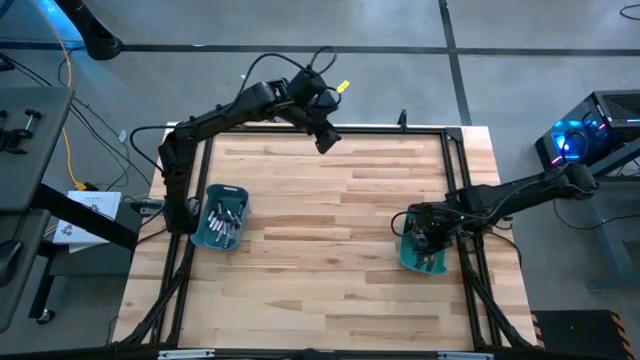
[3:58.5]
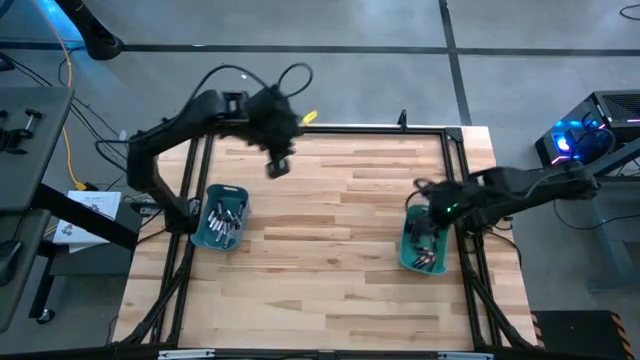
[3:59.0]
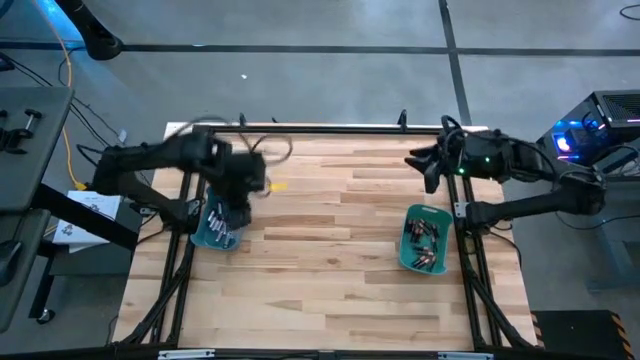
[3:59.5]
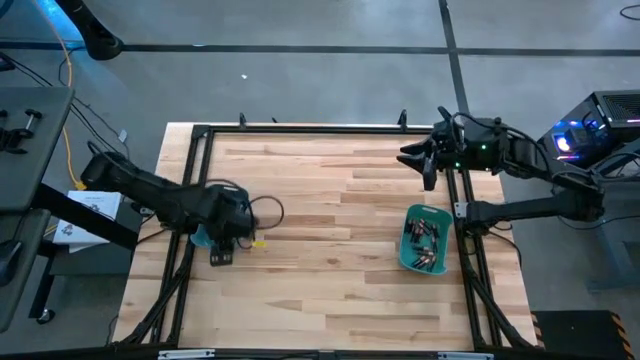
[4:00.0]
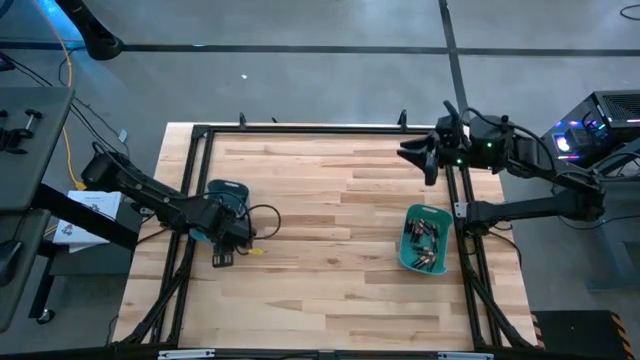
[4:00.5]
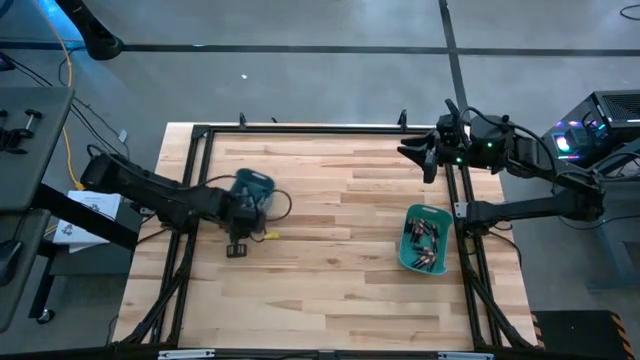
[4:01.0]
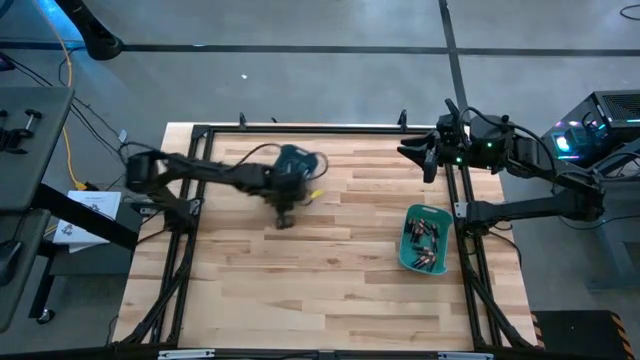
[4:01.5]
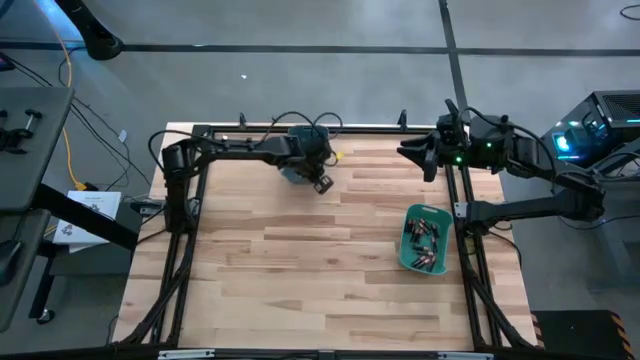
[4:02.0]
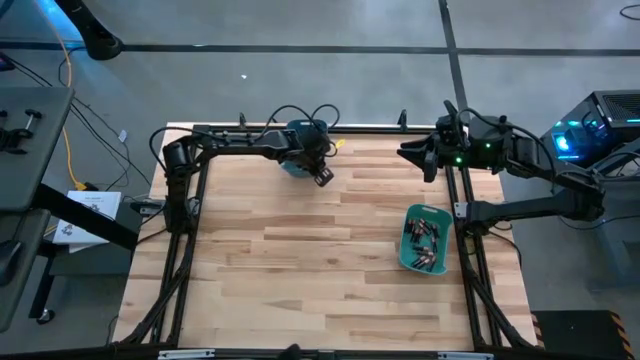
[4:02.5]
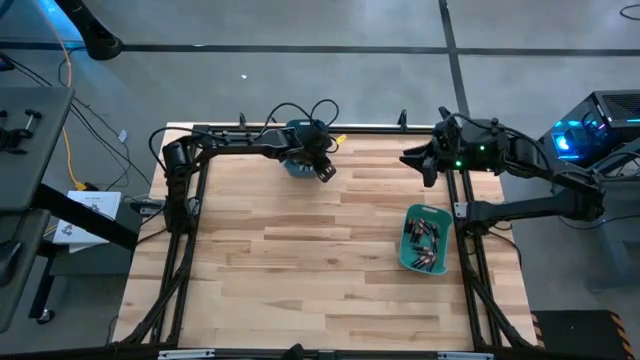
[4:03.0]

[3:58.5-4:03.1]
Task: Sort batteries
Move the blue bin to the top of the table

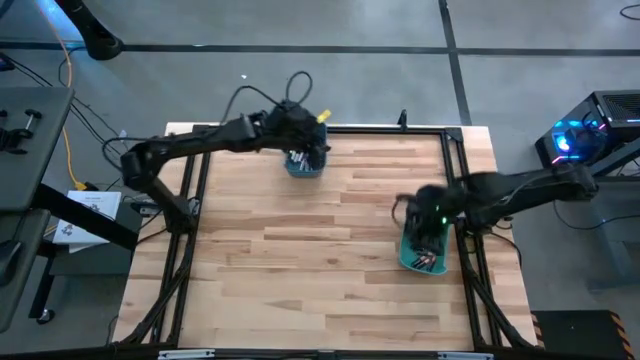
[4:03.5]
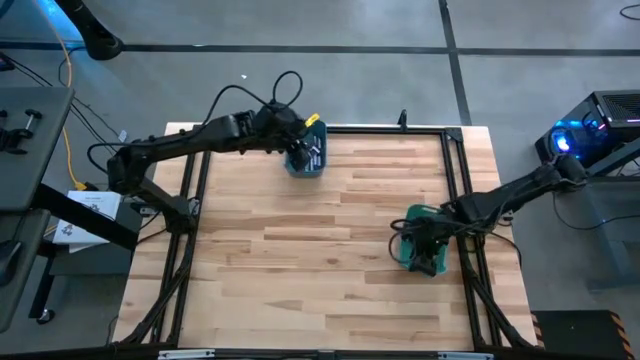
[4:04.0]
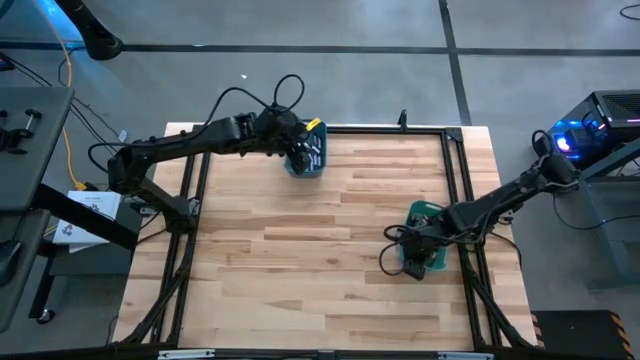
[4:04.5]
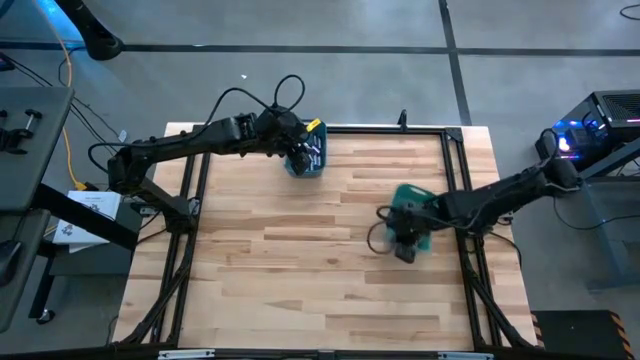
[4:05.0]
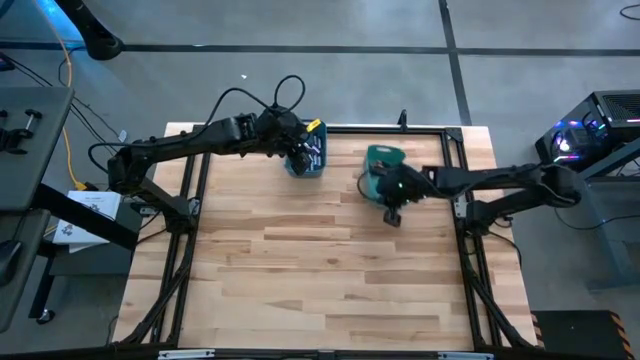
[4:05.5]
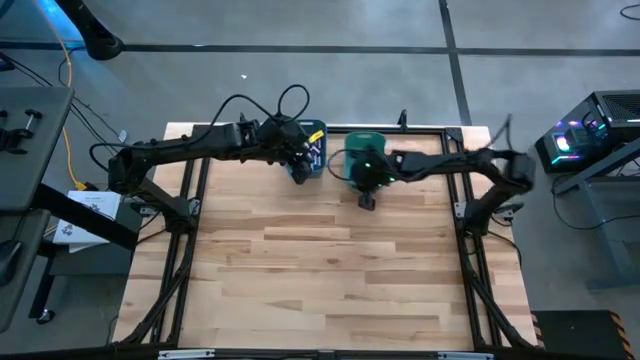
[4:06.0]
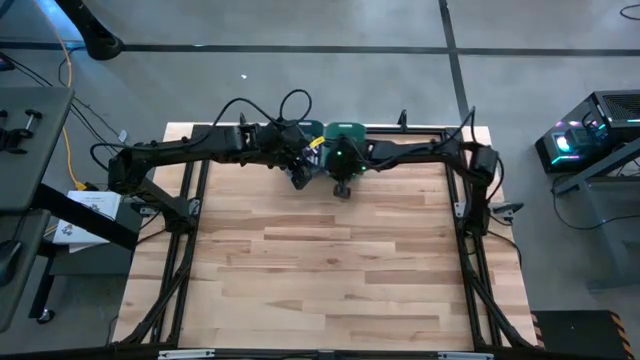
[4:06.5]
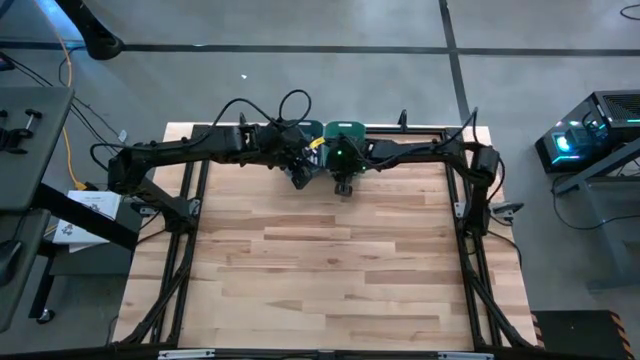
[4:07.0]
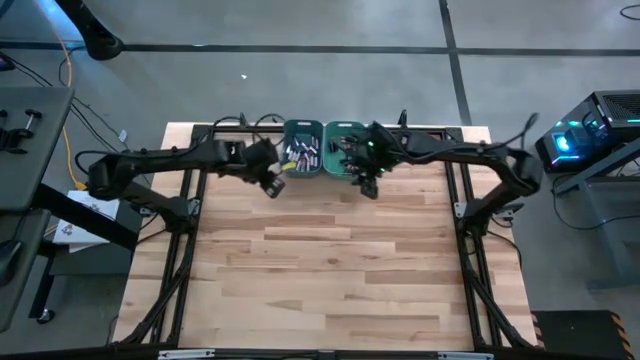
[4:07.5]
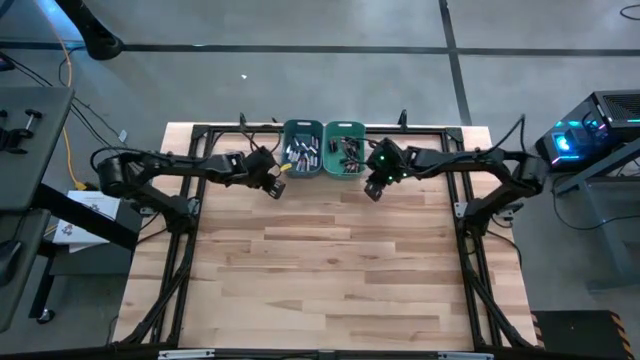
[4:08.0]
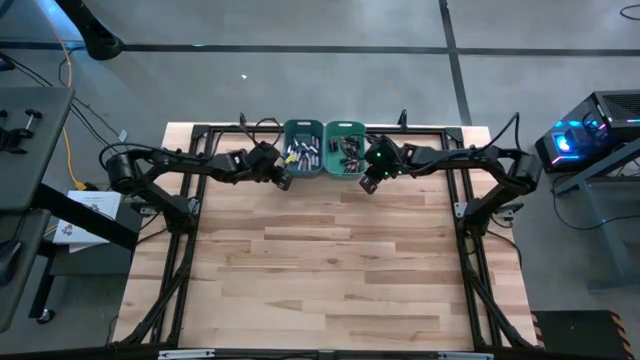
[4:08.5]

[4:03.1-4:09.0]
Move the green bin to the top of the table

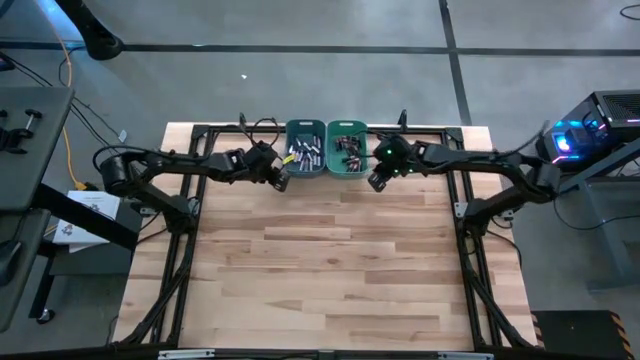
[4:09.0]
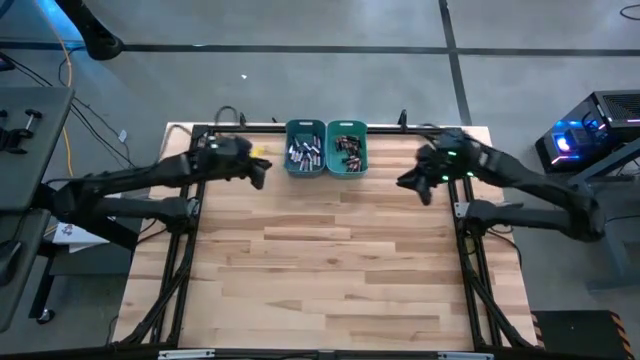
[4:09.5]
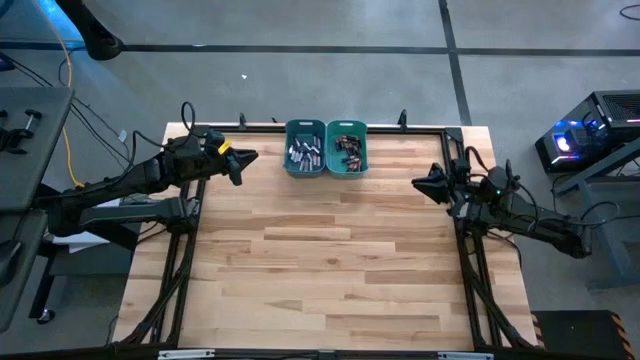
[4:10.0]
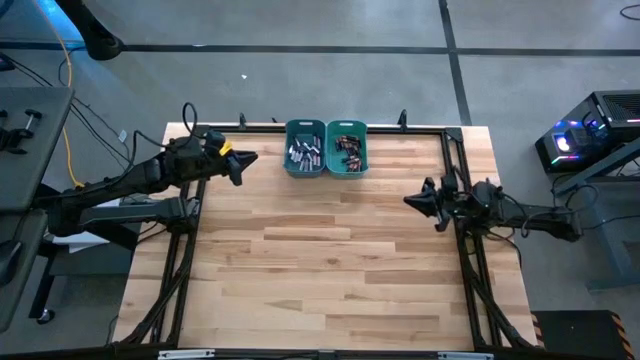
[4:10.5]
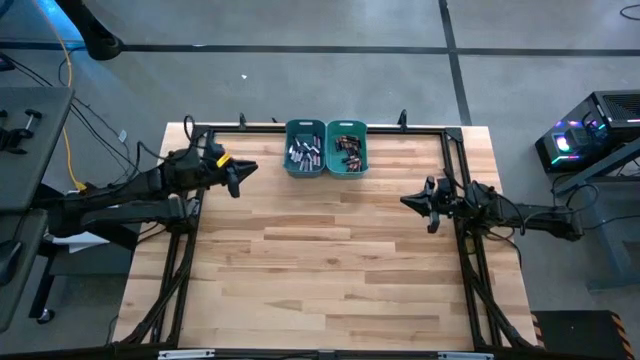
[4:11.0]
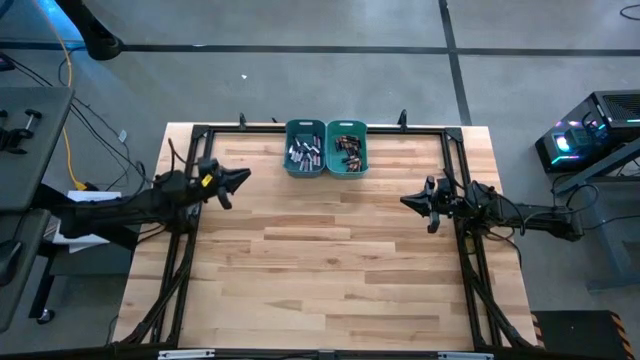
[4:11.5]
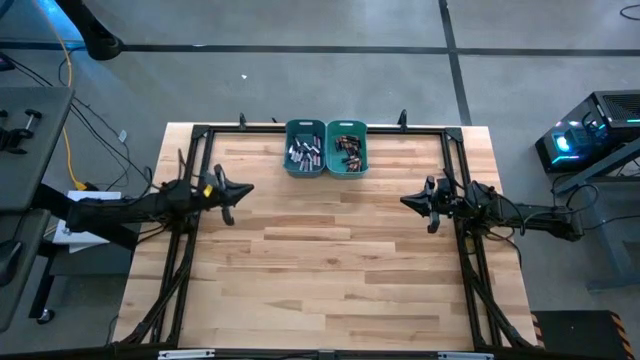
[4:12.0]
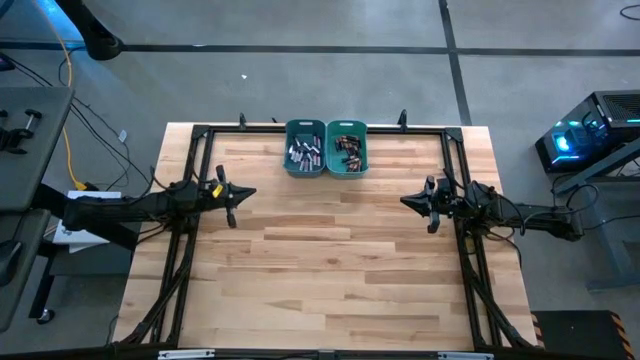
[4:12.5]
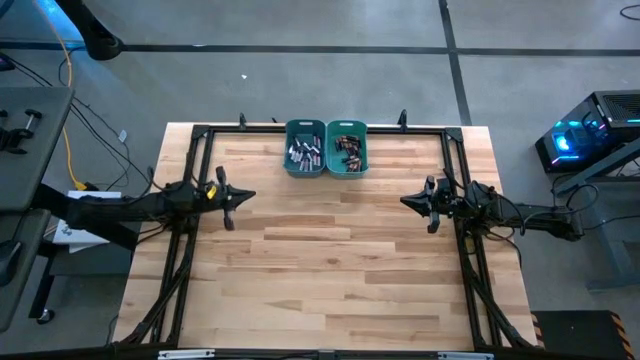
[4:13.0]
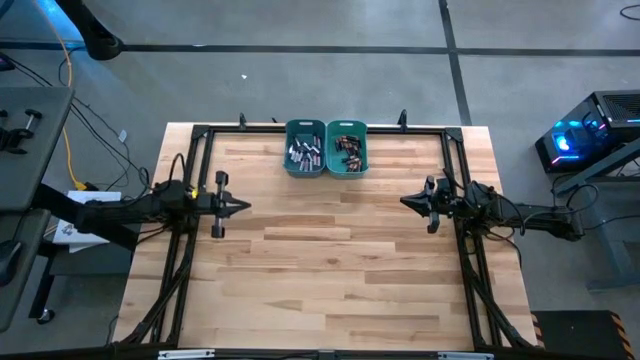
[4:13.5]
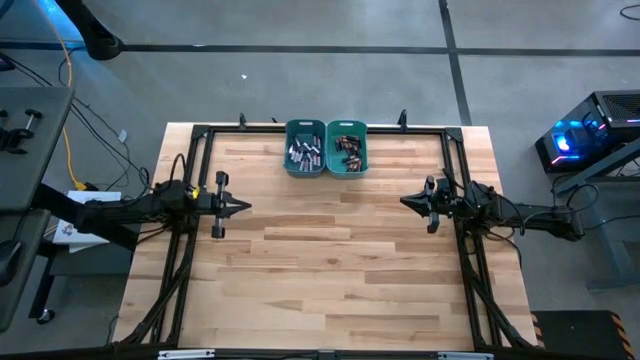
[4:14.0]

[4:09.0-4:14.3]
Return to Home Position

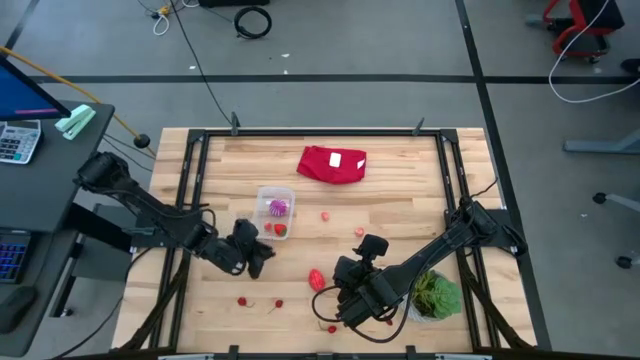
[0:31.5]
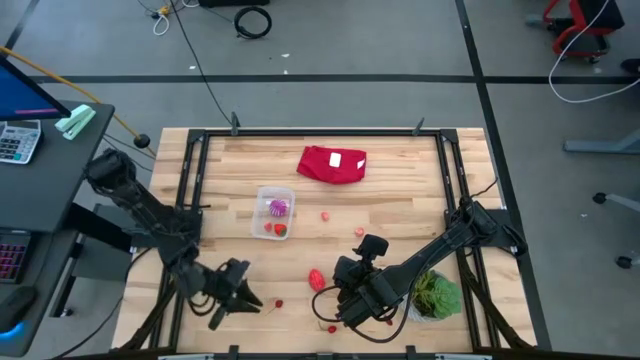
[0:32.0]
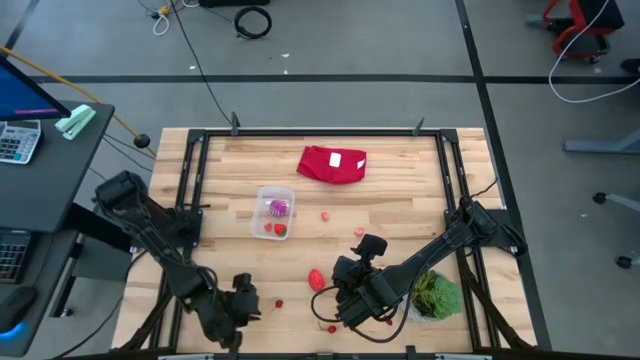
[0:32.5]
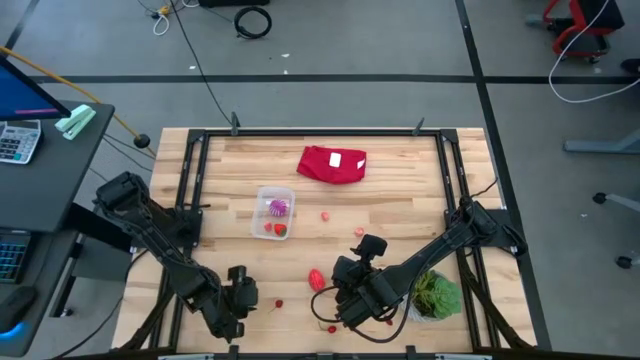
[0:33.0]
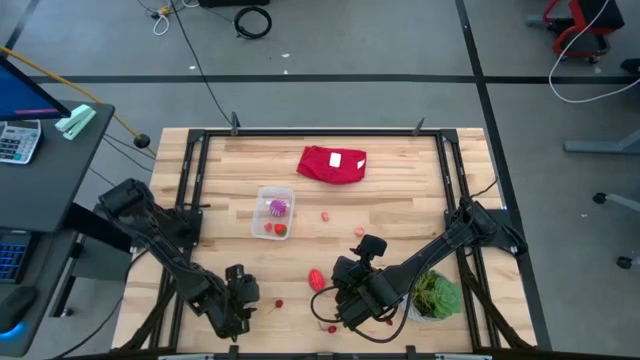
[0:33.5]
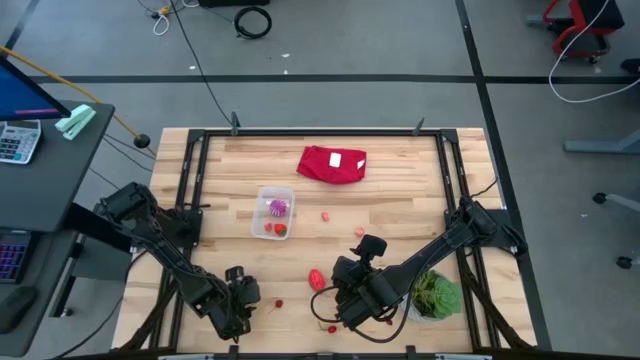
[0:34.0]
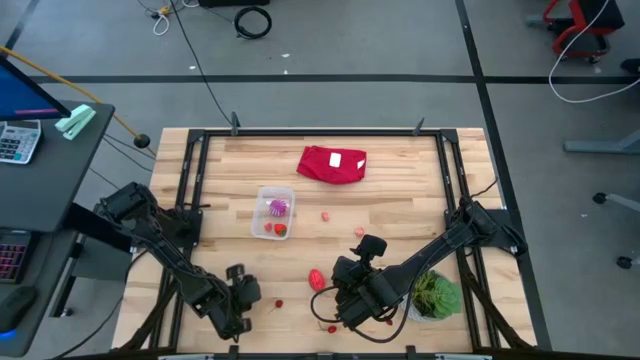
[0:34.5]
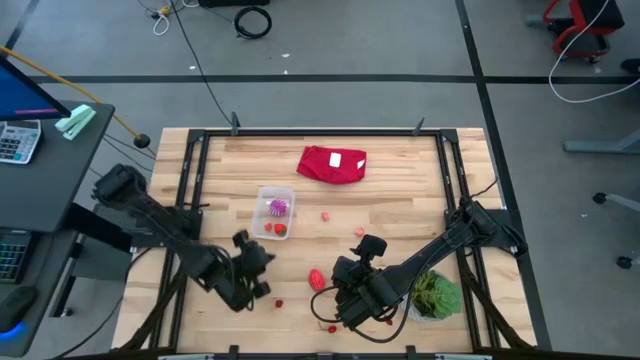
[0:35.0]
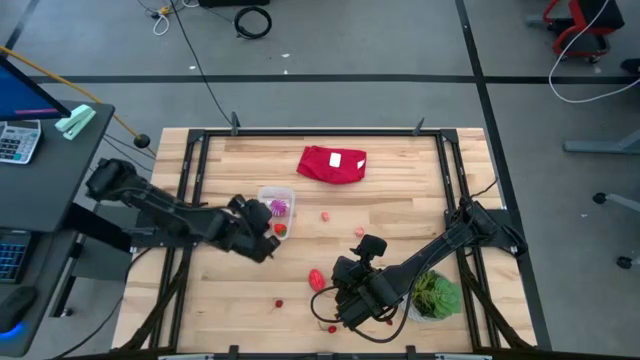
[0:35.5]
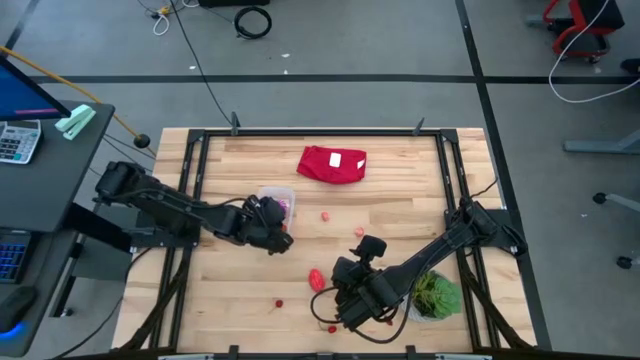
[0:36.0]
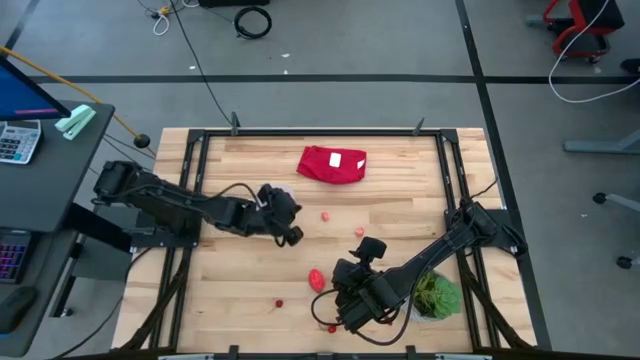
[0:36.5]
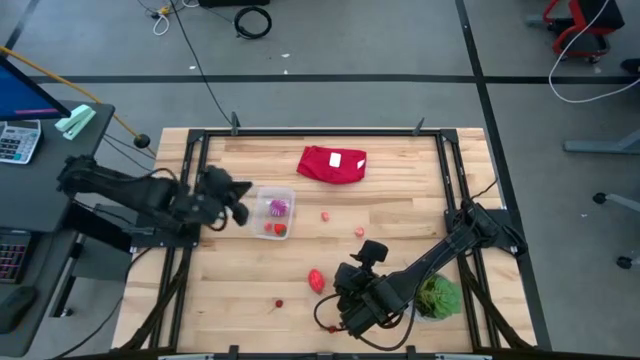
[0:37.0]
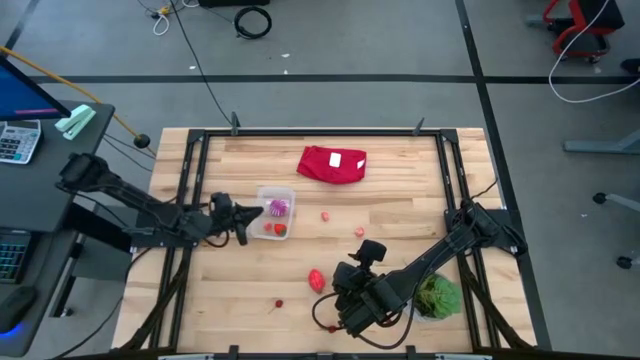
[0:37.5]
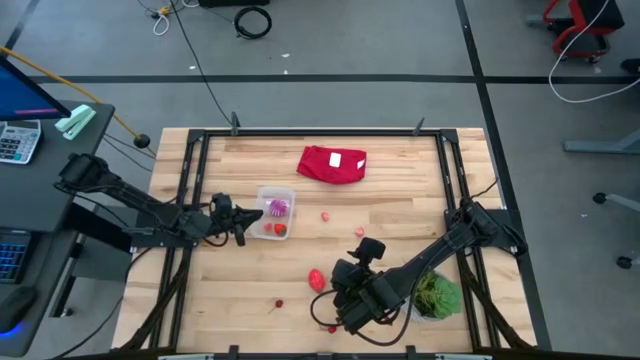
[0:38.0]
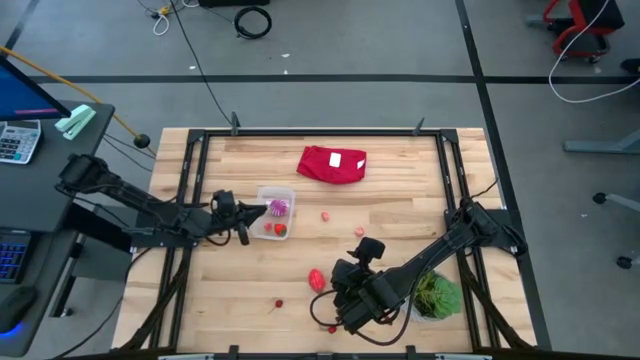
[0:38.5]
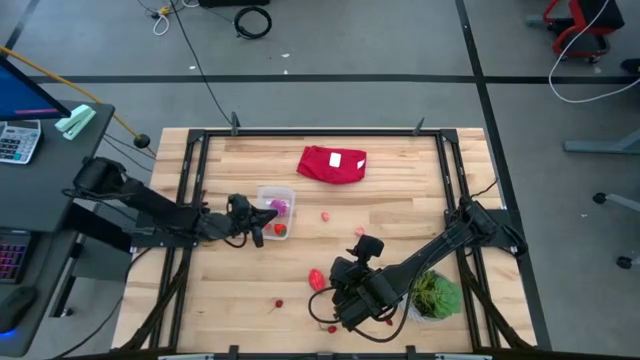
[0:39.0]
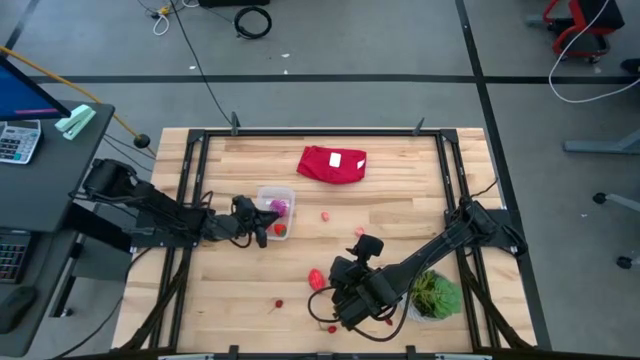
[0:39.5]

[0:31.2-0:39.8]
Task: Pick and placing Produce into tupperware
Put the red cherry in the transparent bin
